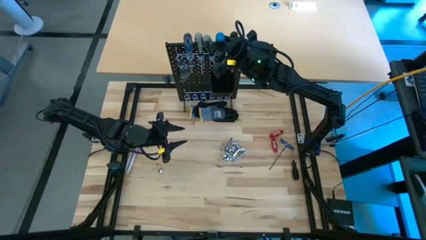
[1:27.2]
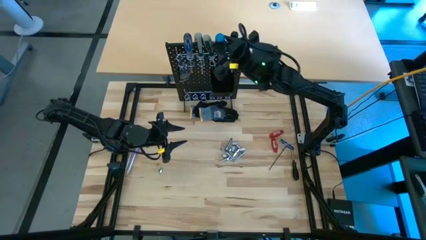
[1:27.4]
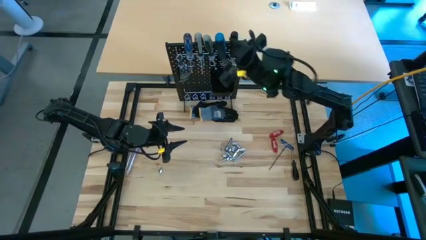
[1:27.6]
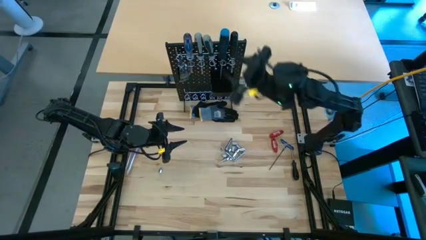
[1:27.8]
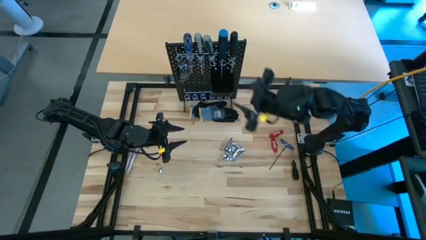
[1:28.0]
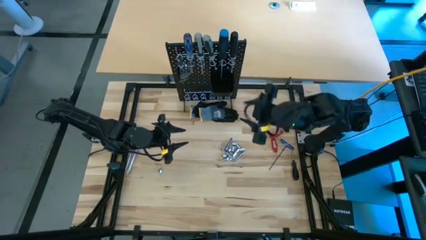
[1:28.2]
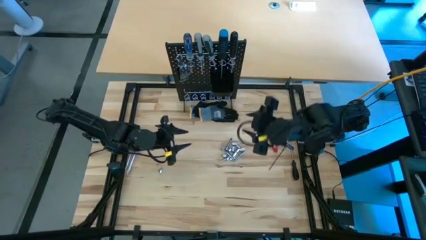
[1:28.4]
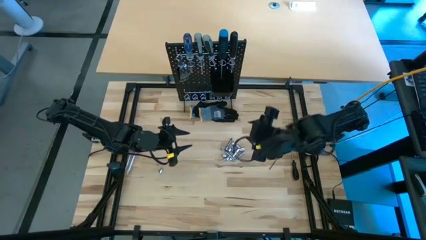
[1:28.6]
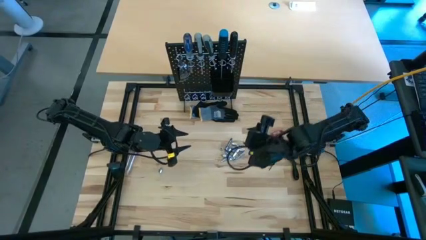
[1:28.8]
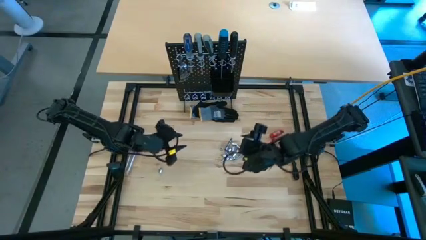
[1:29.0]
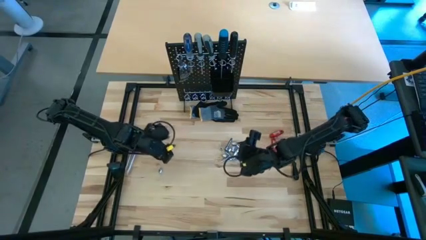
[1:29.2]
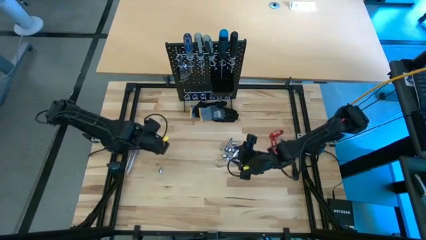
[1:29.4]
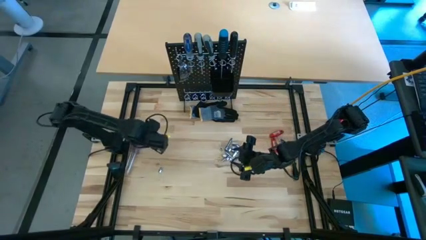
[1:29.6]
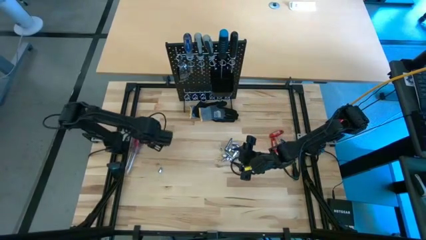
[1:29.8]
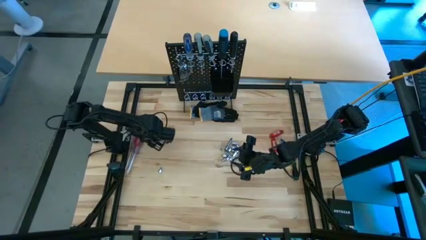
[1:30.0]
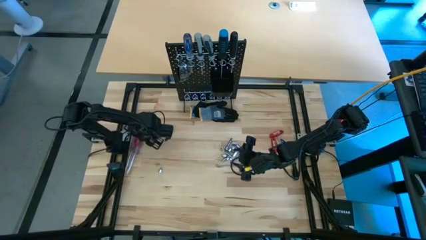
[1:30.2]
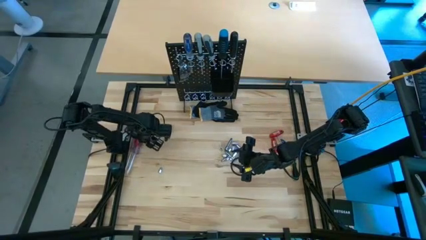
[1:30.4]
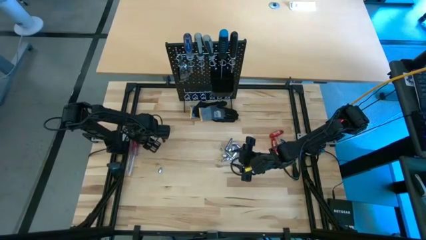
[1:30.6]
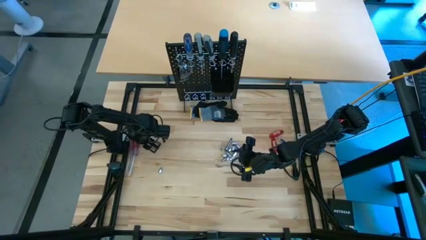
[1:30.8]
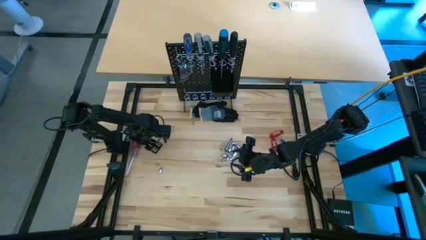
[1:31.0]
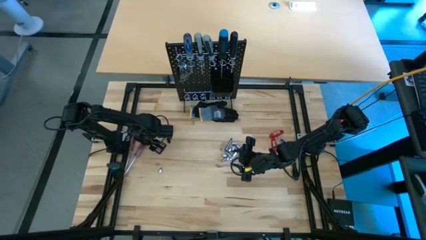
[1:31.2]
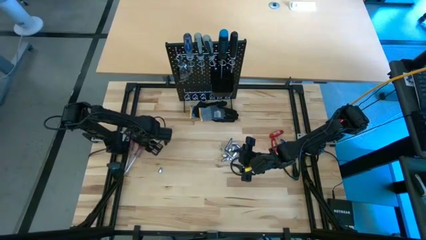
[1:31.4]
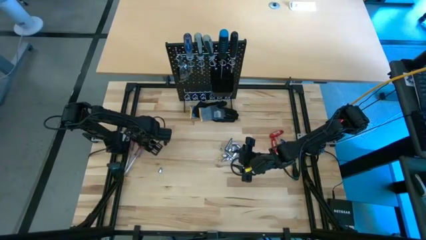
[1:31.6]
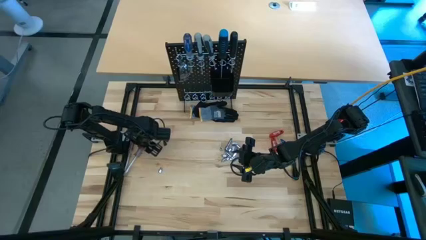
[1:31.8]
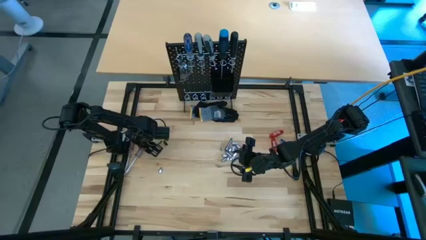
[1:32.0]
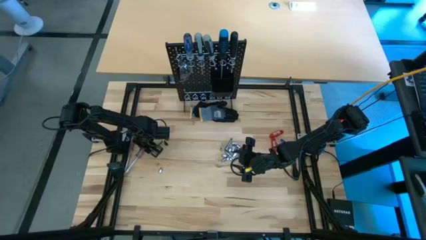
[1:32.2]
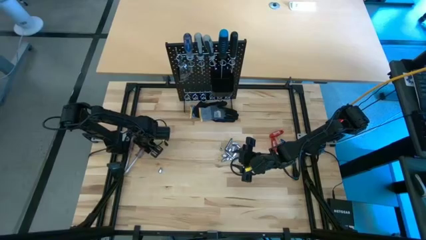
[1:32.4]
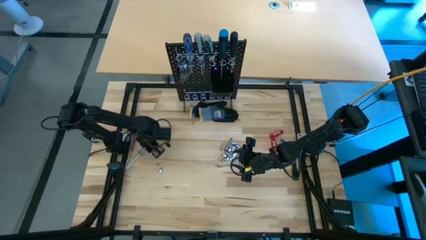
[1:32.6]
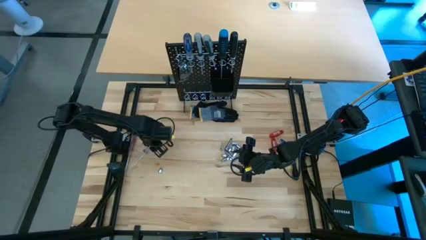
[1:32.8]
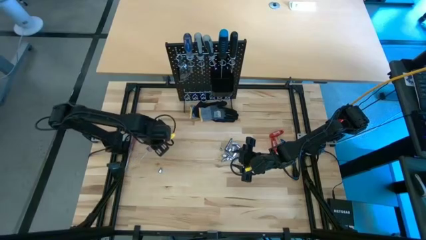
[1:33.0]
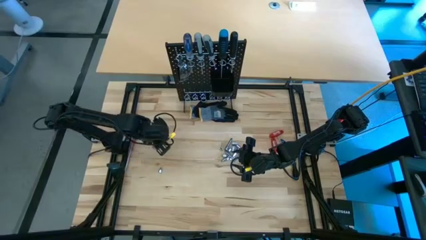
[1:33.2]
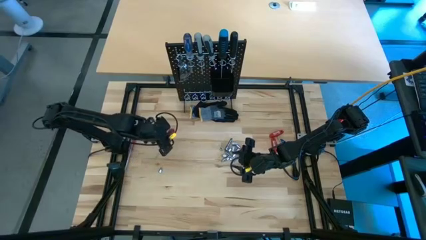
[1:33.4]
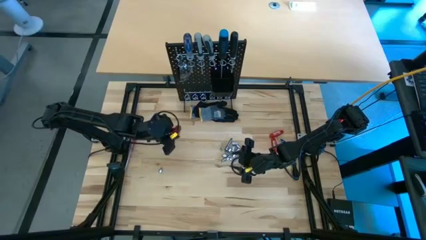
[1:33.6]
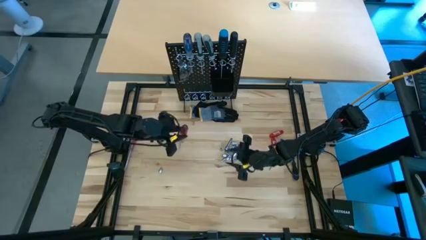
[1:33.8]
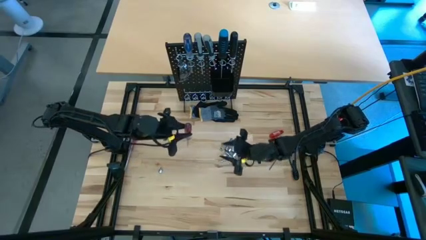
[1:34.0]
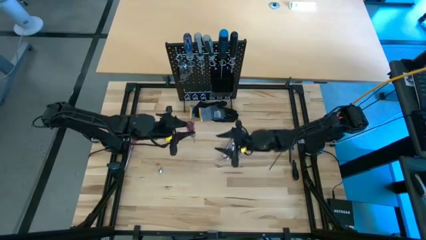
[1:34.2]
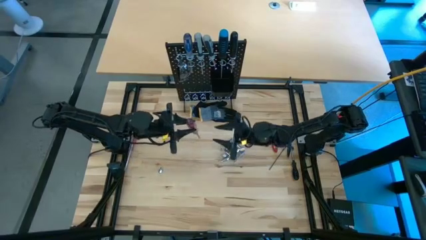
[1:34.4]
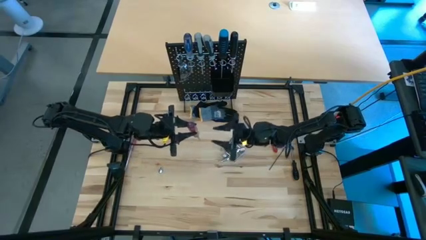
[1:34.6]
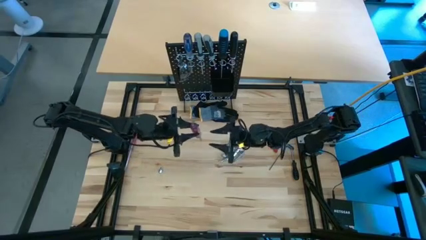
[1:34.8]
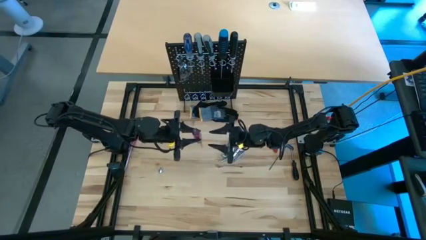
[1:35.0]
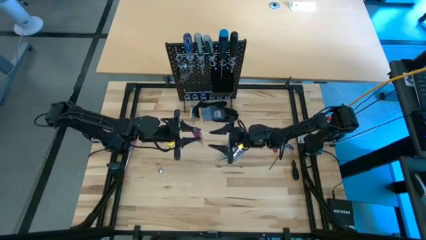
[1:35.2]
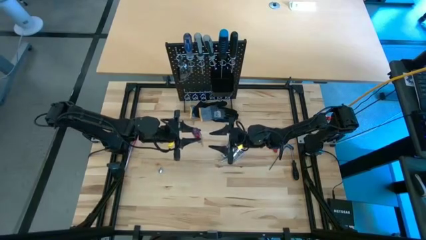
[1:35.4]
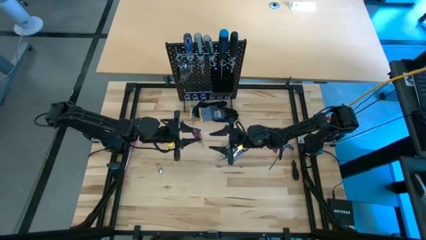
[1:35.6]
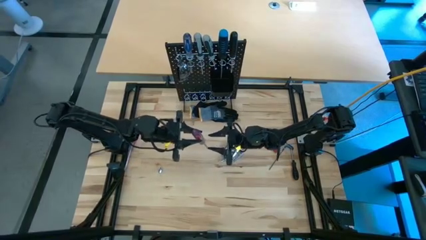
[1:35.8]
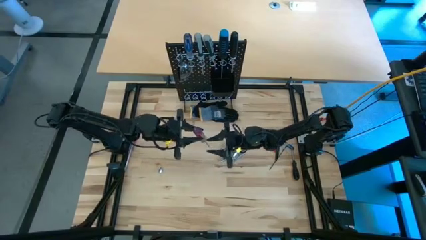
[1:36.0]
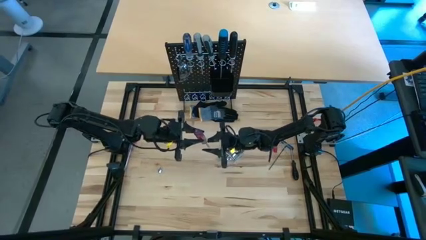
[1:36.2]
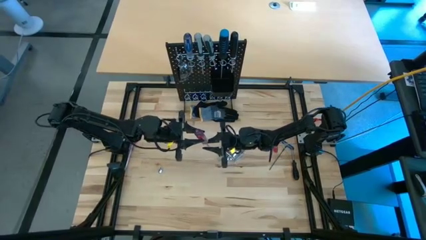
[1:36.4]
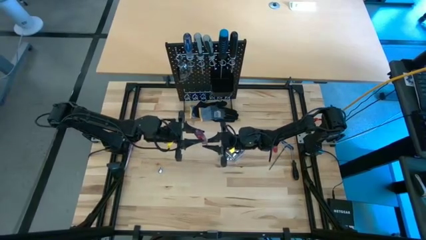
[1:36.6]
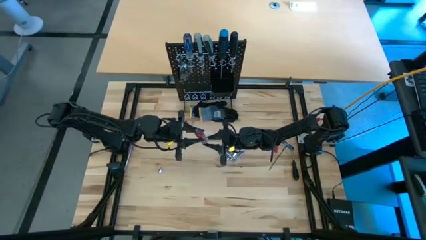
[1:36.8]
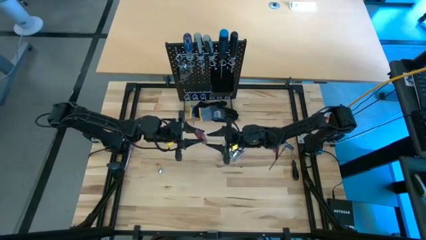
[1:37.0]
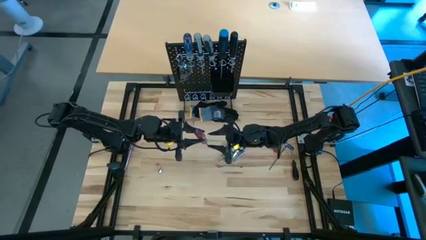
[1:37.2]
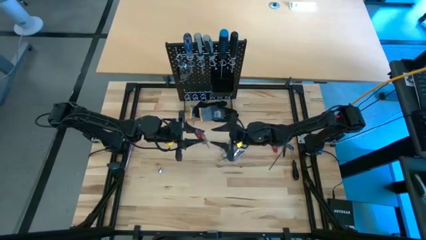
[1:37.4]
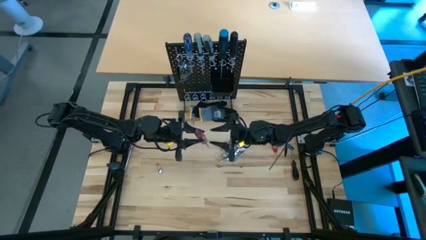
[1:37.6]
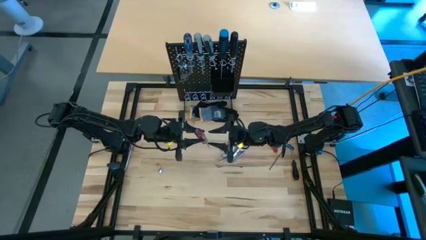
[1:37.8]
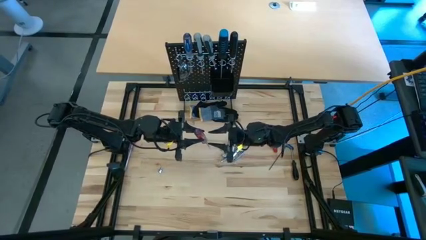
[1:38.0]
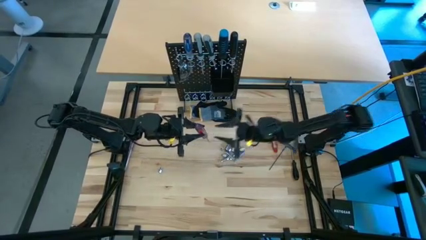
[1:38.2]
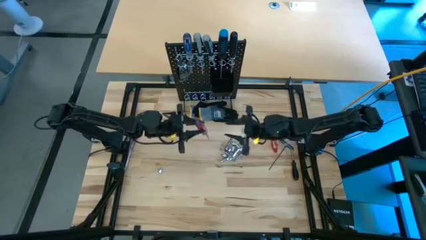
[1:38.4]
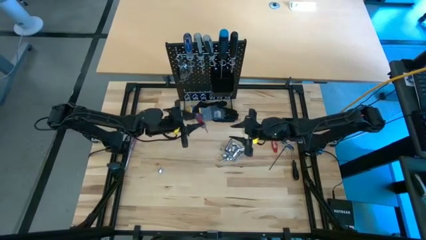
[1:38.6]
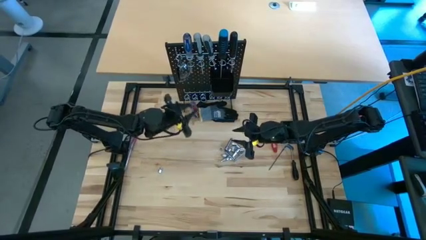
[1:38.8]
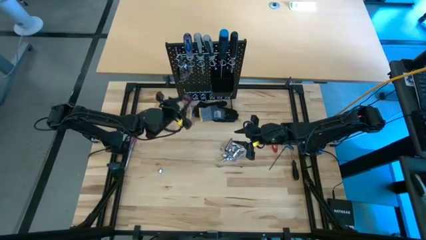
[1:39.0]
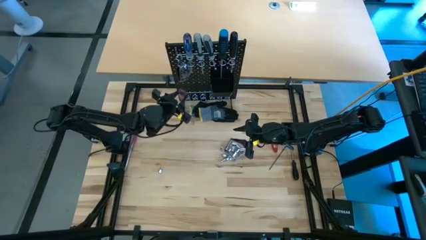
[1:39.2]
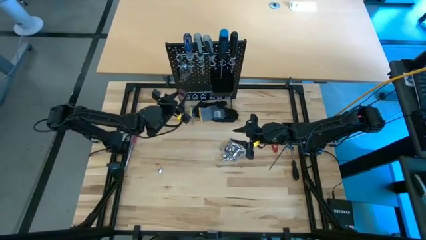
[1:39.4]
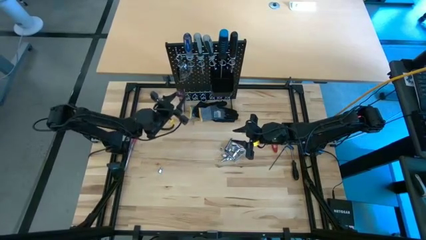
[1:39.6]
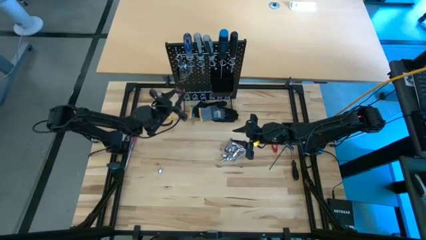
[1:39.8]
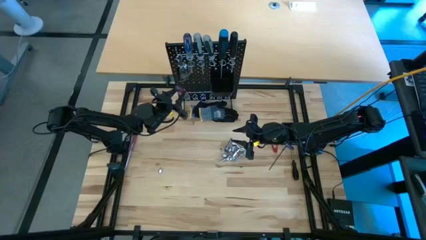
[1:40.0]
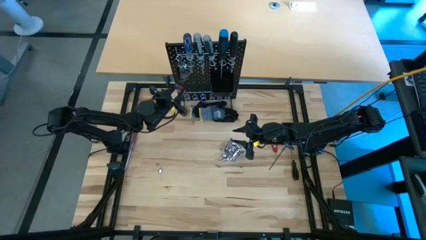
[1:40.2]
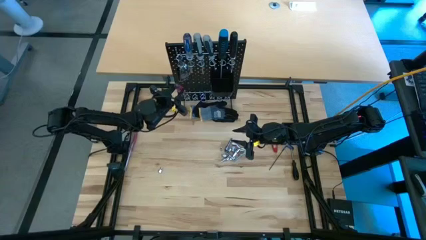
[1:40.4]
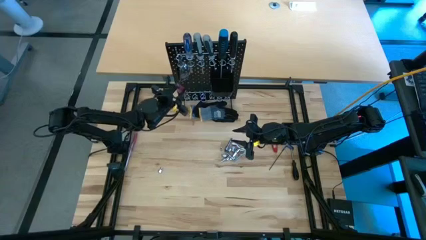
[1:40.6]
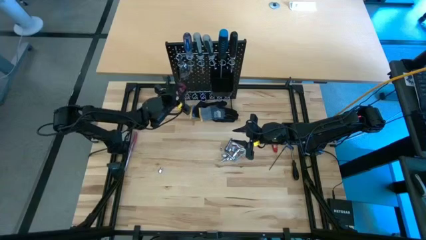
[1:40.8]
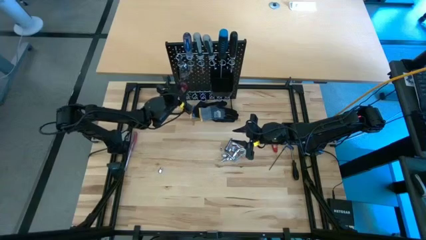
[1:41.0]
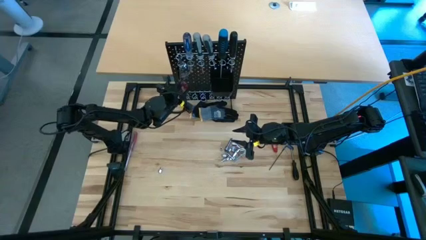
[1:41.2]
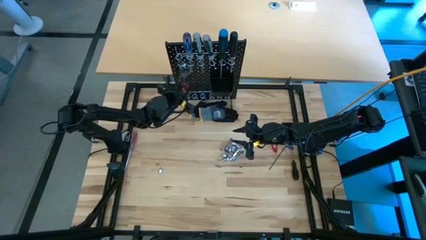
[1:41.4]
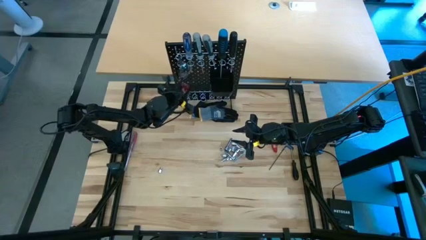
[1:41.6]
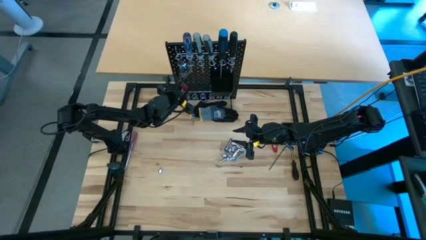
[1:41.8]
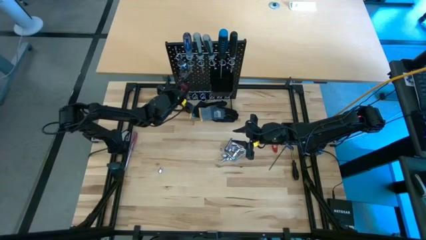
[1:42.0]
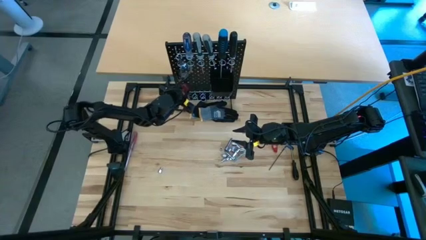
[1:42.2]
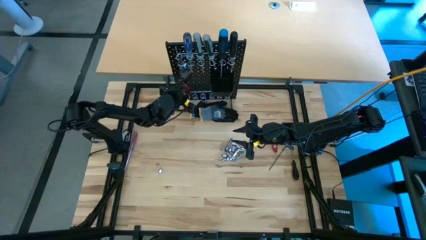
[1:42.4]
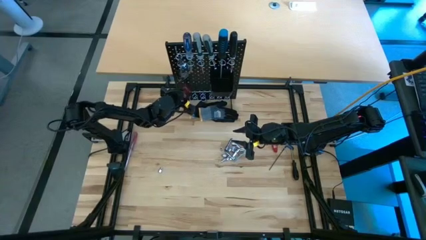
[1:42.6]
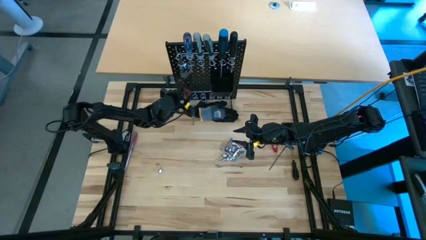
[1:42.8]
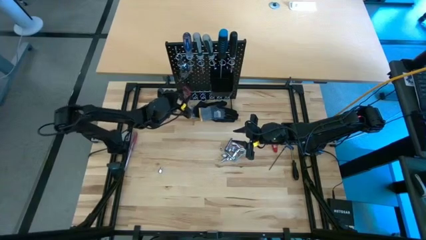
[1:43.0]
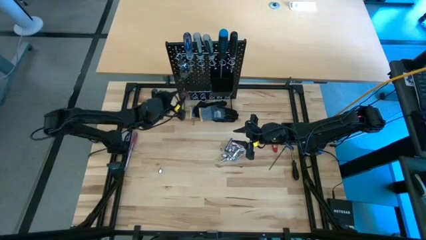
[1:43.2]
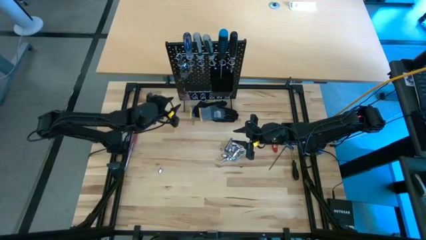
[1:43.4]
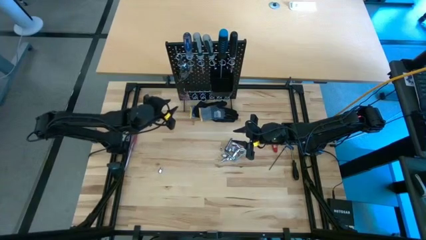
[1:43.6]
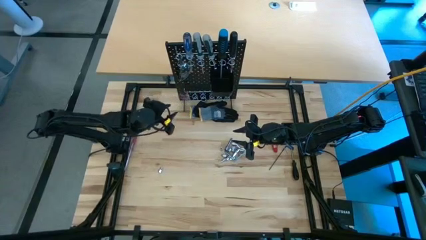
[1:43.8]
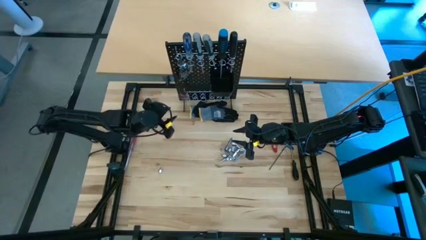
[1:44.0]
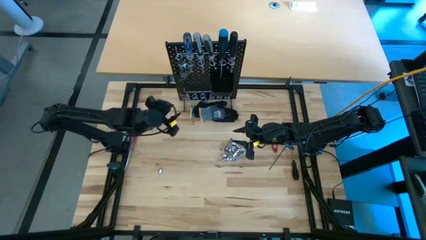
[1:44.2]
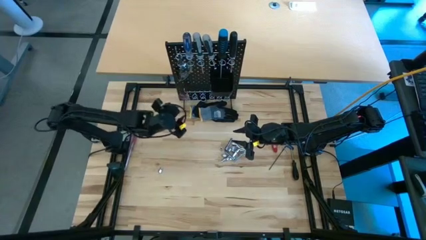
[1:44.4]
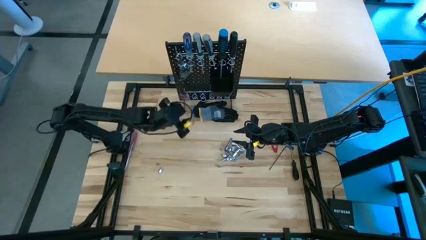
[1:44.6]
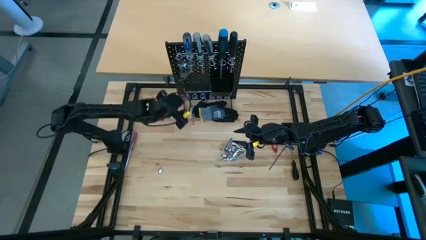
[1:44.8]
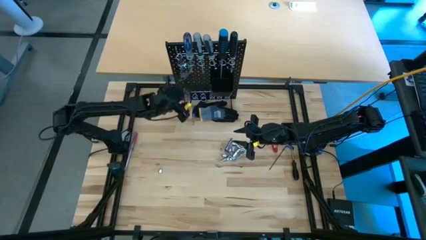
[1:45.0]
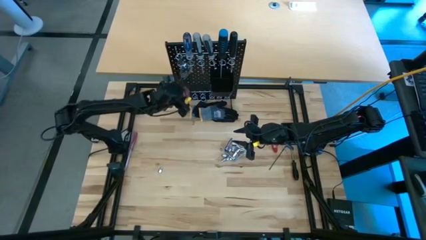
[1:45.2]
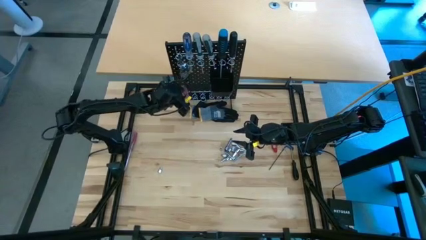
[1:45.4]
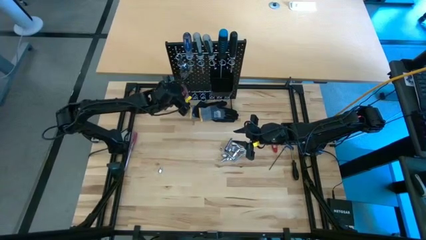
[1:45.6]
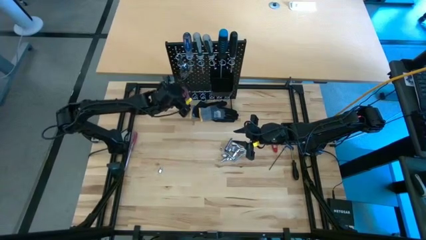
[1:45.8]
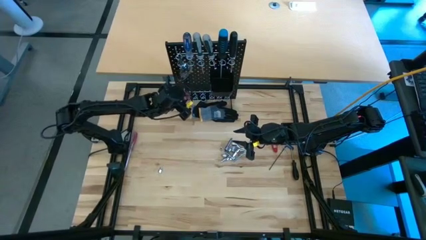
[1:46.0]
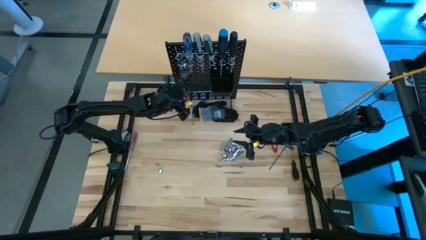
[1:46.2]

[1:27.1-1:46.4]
Task: Hang tools onto peg board
Hang the red screwdriver on the pegboard
